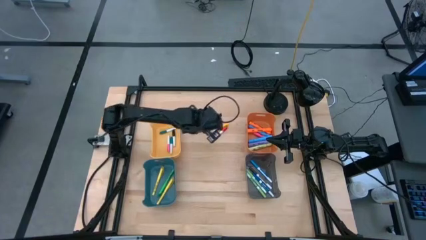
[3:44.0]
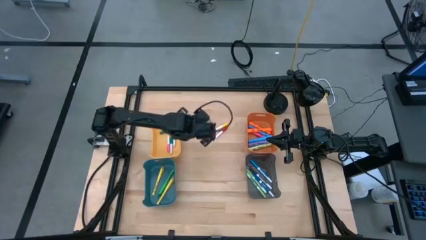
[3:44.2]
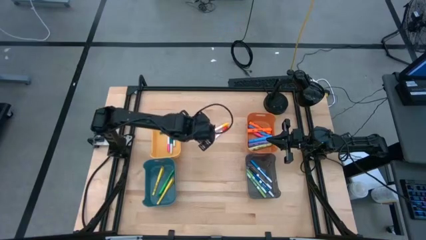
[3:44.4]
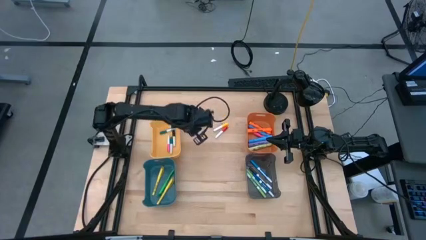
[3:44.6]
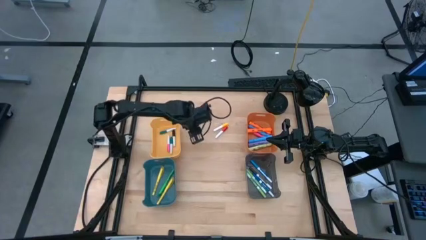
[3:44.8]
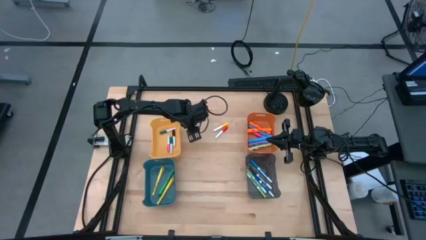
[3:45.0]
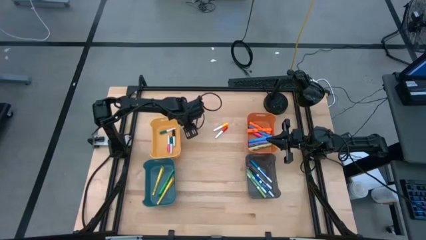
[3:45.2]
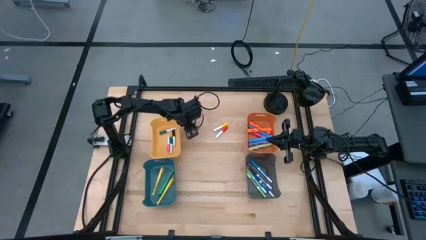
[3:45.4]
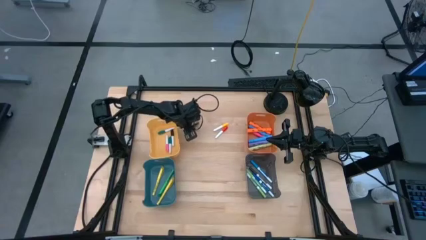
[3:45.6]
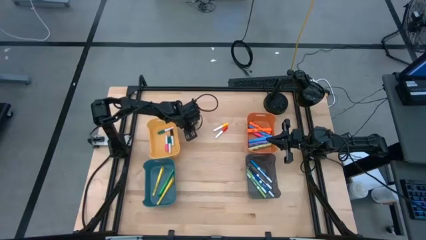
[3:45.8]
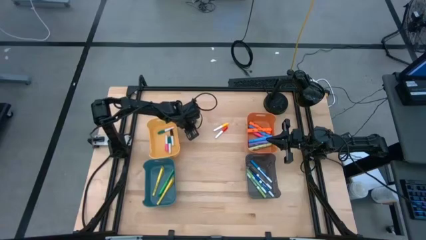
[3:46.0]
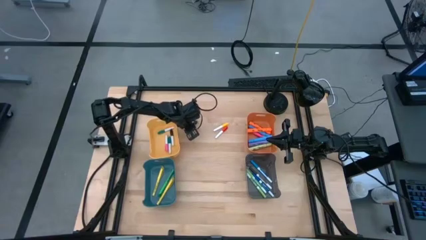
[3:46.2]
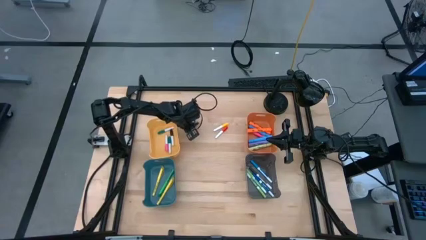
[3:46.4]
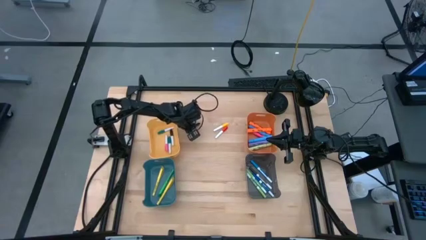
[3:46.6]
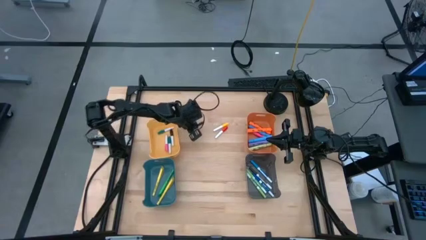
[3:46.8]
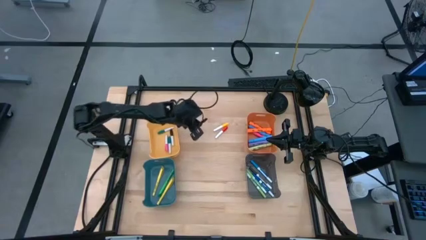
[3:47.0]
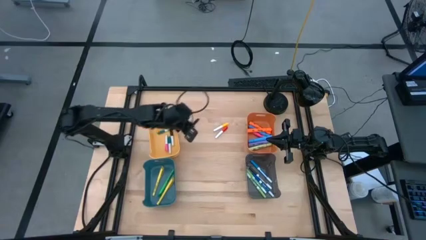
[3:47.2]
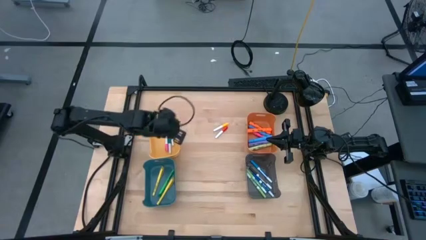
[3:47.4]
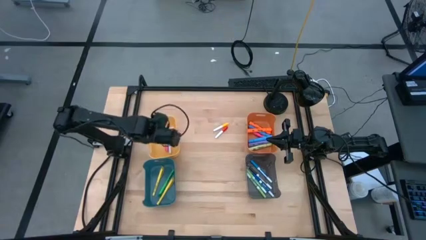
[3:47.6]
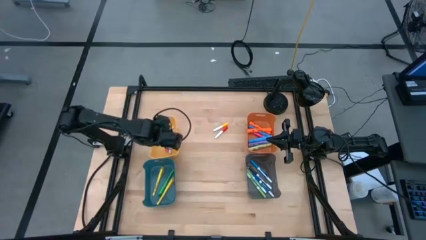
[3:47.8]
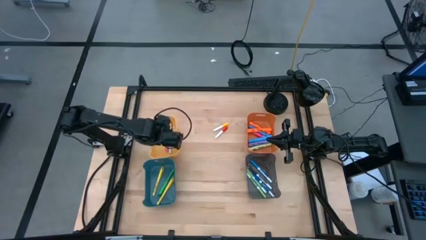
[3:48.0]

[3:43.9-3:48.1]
Task: Pick & Place Markers
Put the black mini marker into the yellow bin

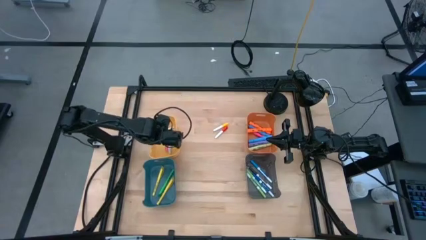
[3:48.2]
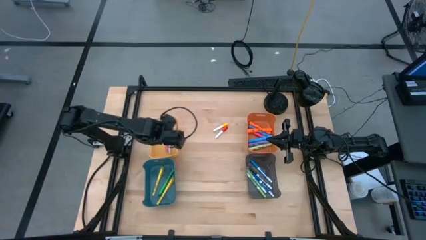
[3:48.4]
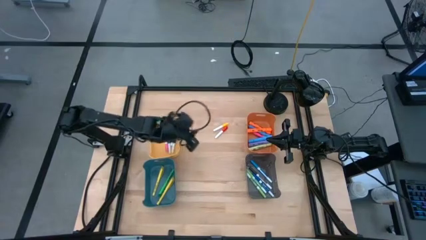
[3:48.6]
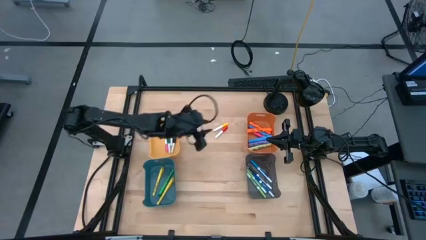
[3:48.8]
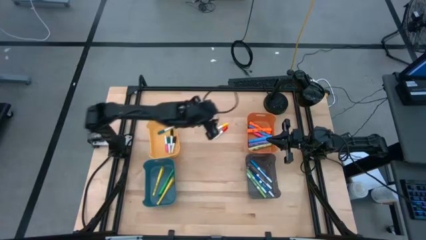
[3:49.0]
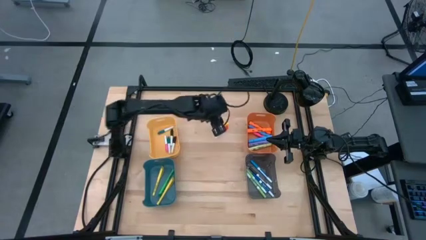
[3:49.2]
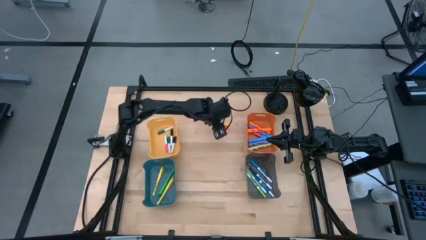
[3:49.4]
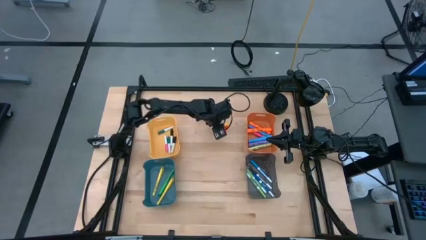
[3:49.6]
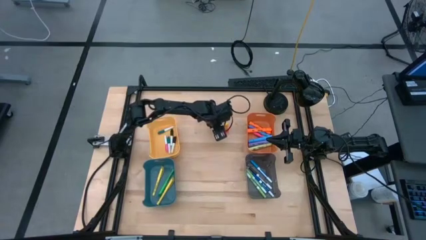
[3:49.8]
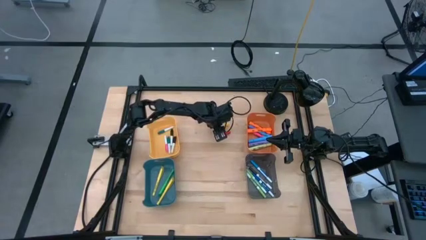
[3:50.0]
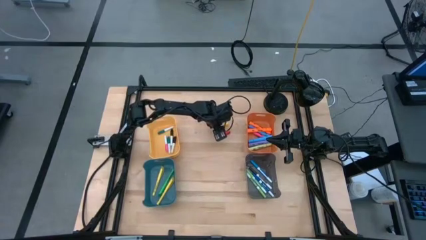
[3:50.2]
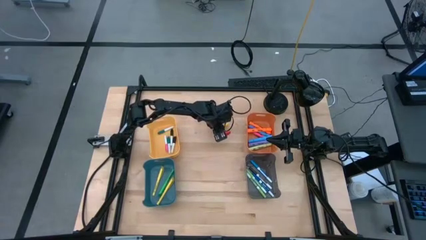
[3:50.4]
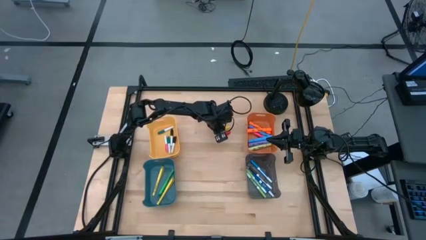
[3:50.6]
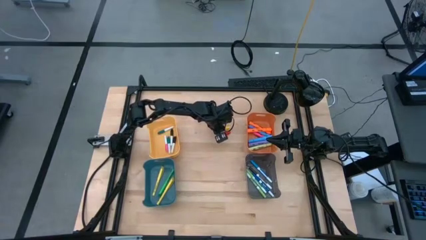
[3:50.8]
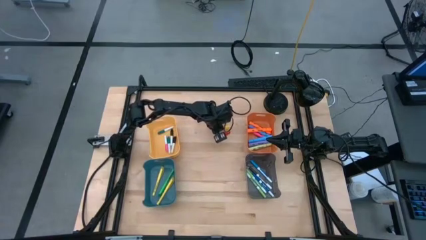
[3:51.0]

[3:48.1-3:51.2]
Put the yellow mini marker into the yellow bin

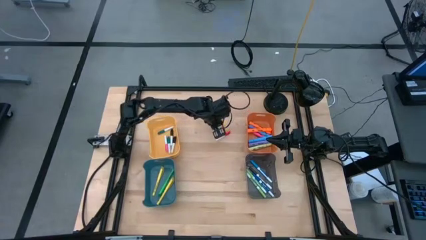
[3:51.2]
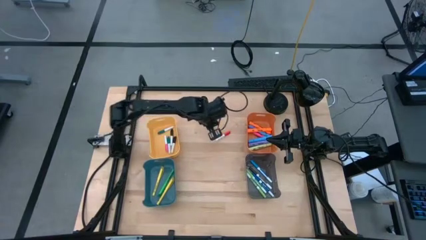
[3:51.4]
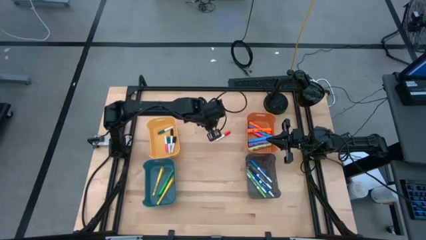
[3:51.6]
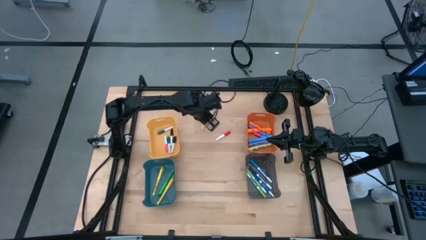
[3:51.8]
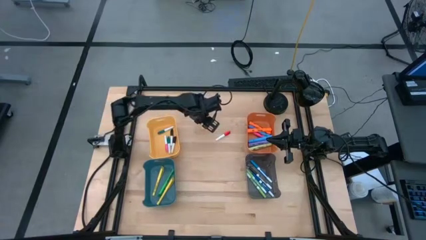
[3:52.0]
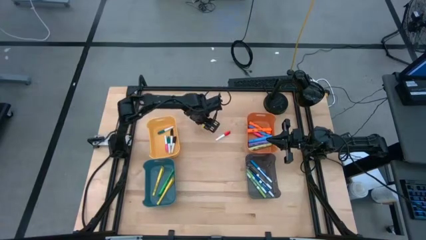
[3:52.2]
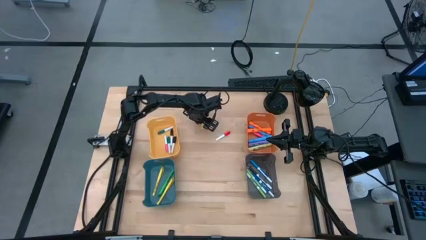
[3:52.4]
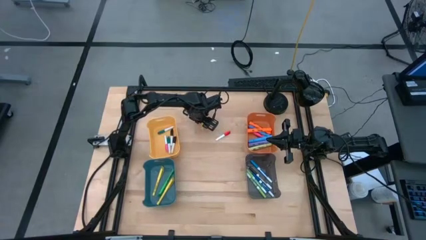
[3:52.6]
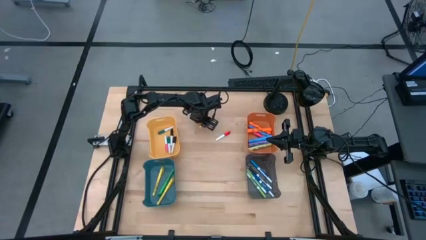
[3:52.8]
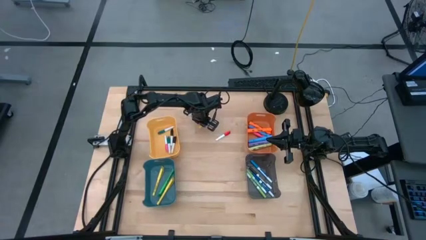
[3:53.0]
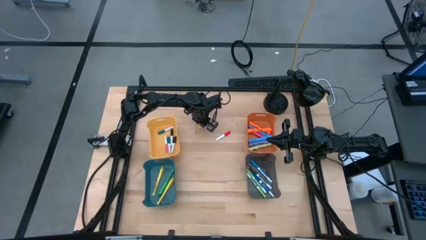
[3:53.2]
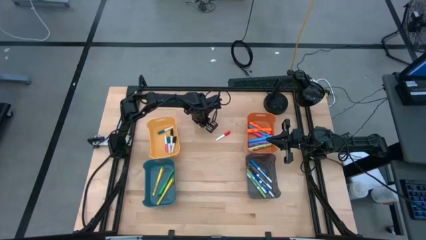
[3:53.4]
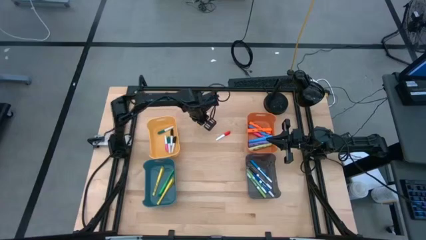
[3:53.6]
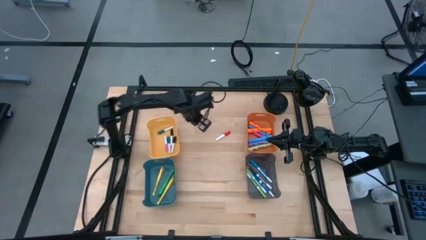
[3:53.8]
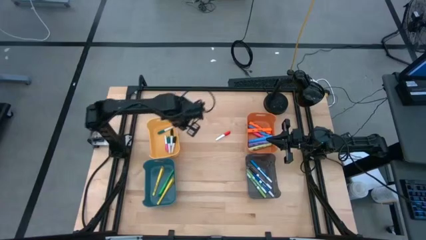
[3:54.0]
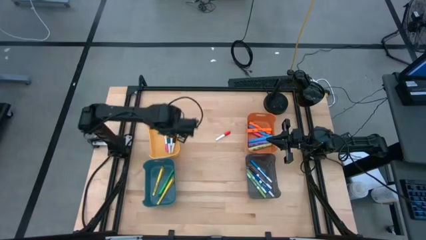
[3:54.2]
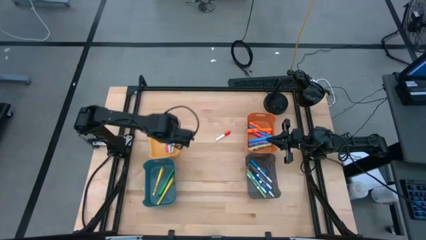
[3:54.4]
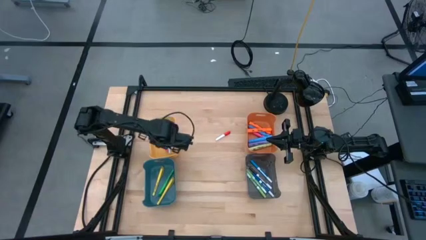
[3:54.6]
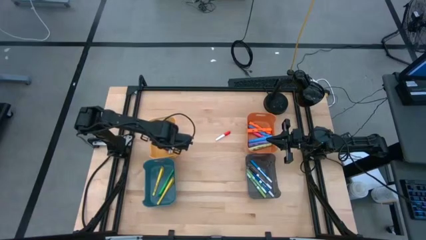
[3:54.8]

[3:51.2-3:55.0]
Put the yellow mini marker into the yellow bin

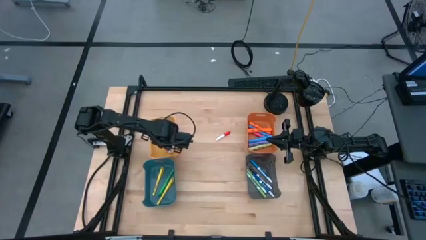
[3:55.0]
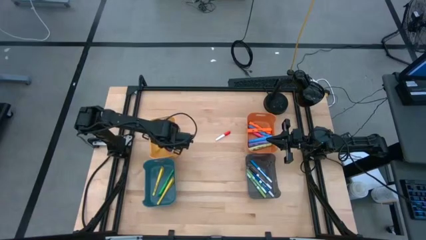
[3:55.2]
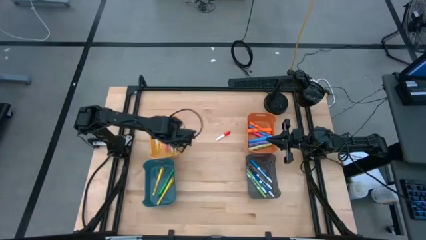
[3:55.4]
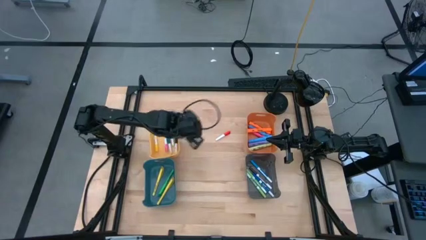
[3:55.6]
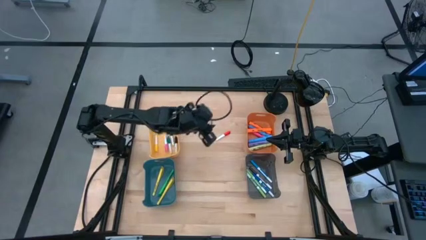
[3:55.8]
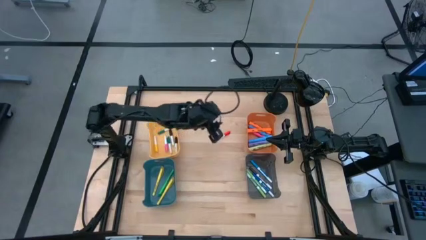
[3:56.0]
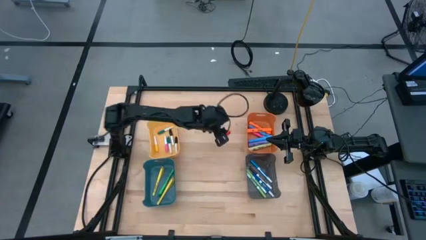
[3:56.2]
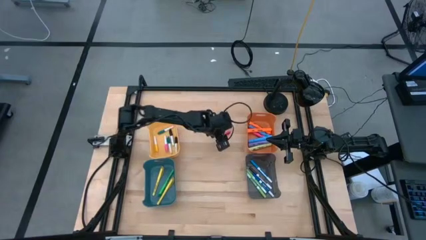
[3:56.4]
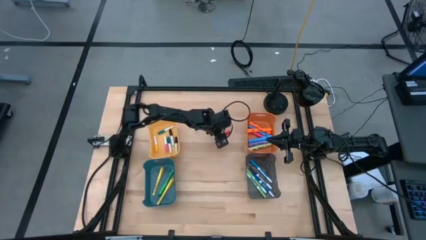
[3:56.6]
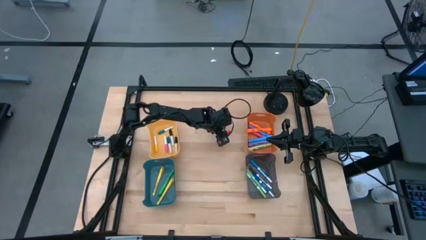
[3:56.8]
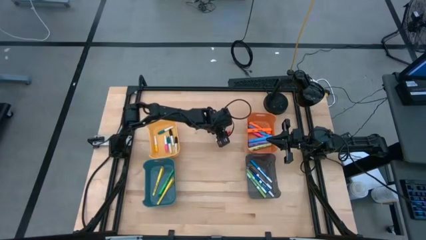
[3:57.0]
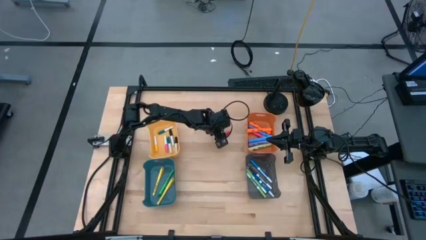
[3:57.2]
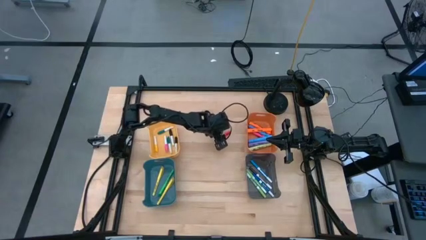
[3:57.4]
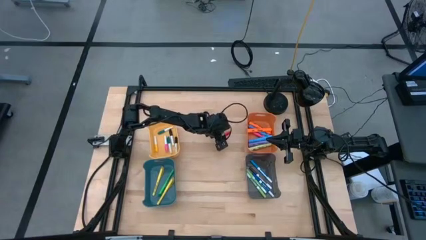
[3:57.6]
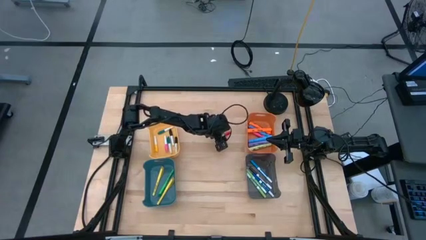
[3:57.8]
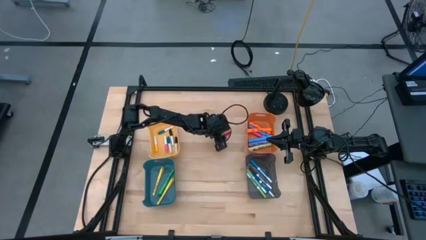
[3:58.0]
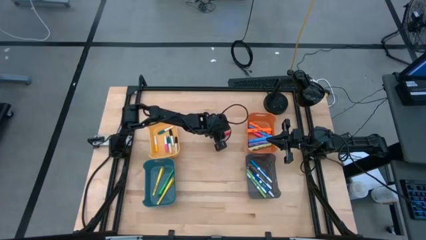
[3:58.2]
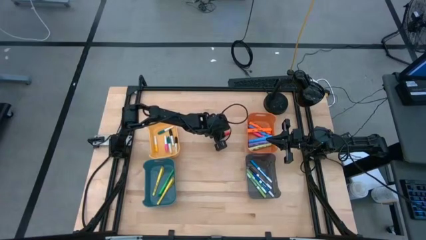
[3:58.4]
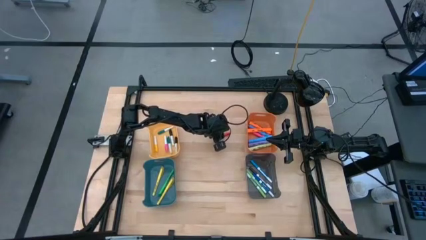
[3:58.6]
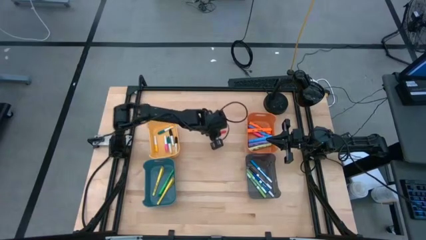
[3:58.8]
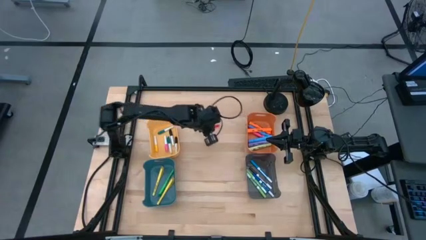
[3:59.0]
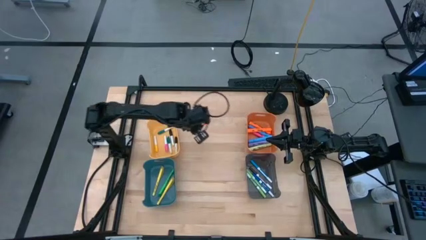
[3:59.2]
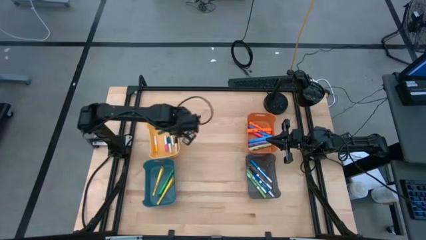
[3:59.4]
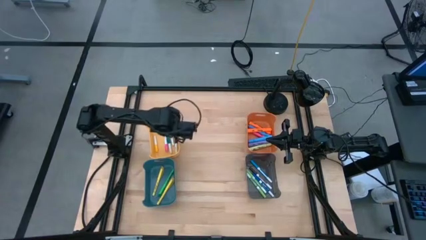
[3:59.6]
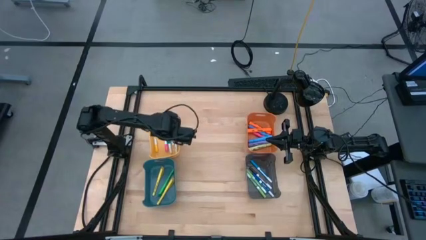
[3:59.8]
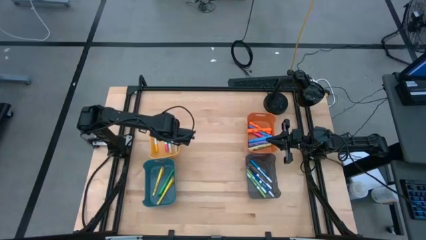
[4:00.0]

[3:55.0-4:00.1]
Put the red mini marker into the yellow bin

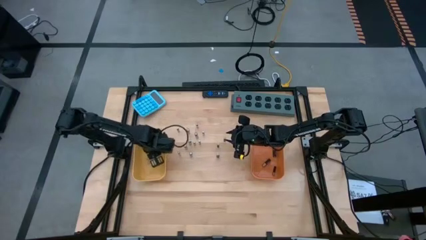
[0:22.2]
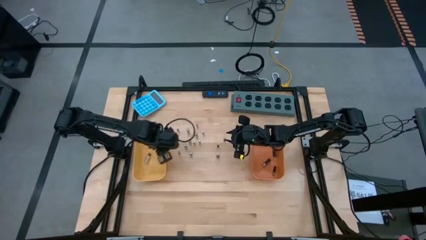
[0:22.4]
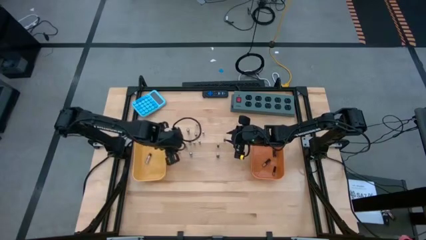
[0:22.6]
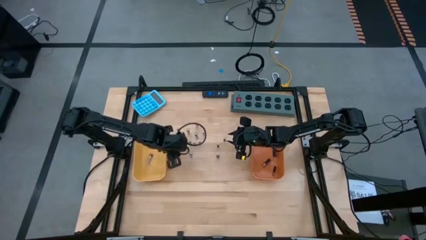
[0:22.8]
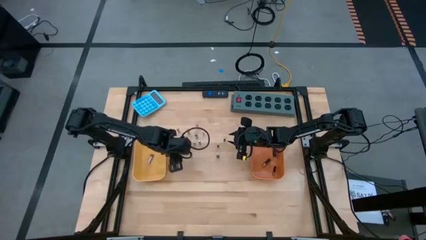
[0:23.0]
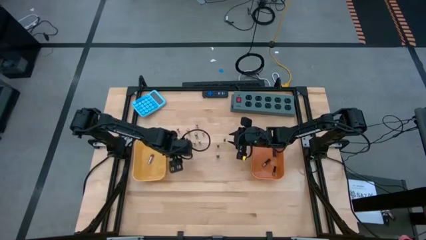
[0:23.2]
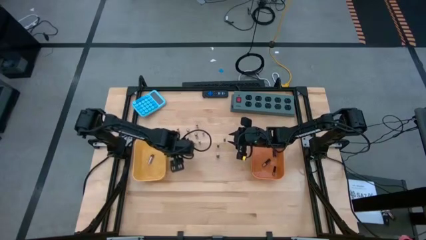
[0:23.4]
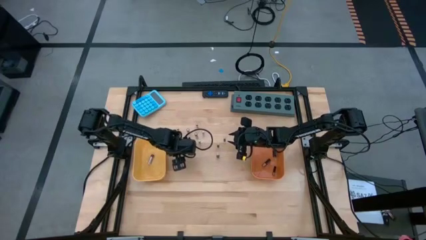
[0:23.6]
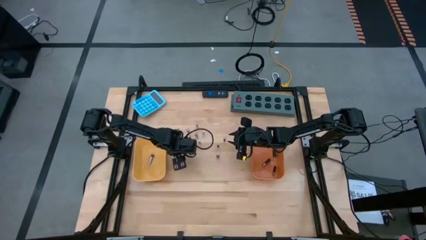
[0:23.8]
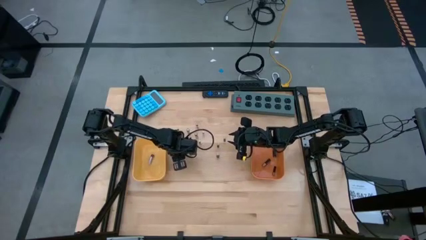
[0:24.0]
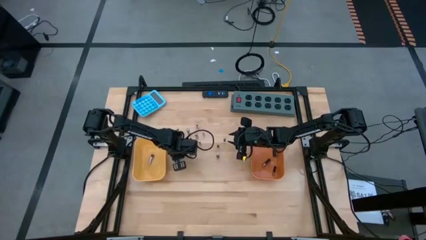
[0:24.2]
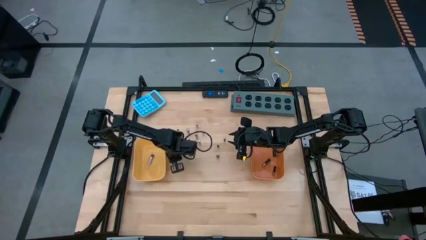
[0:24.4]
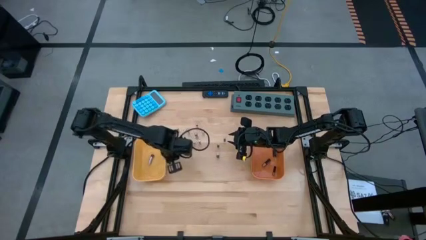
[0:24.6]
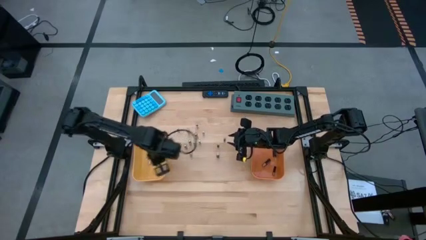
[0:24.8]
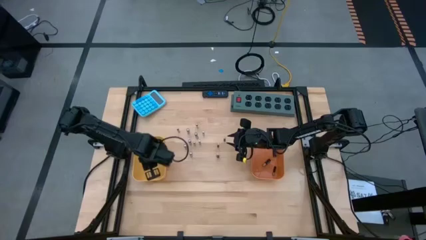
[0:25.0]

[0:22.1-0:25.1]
Task: Sort batteries
Put the silver battery into the yellow bin
